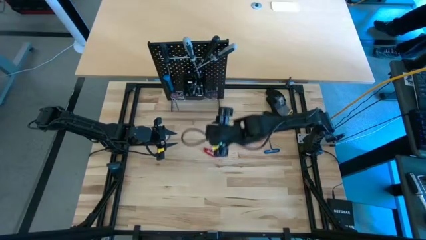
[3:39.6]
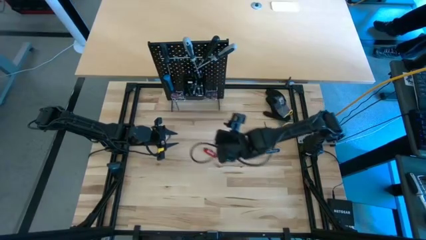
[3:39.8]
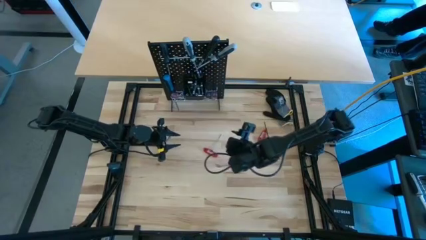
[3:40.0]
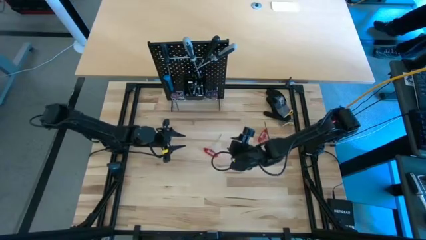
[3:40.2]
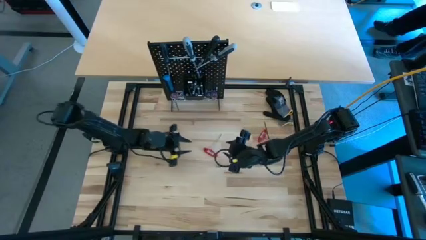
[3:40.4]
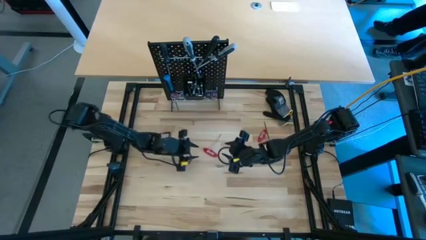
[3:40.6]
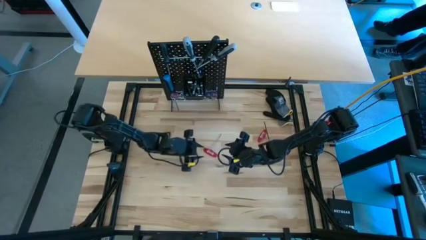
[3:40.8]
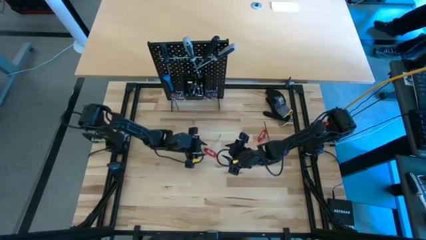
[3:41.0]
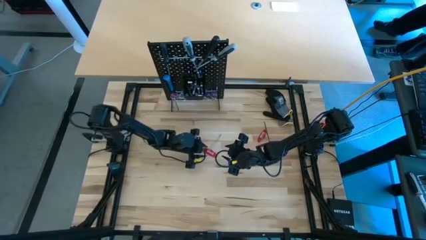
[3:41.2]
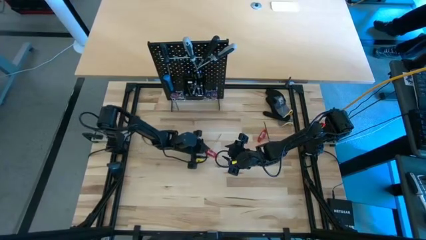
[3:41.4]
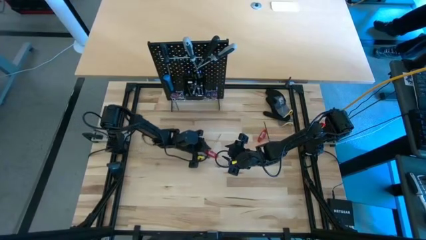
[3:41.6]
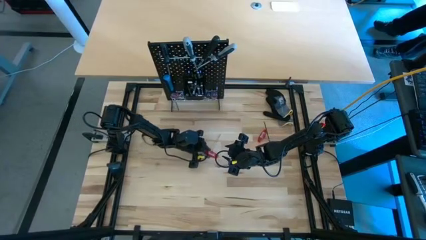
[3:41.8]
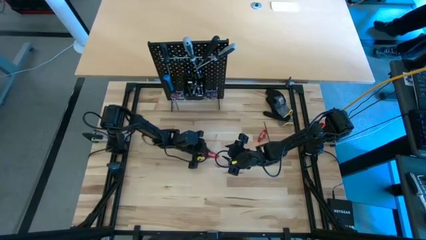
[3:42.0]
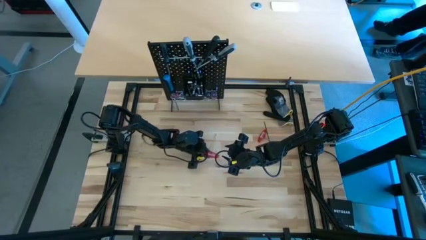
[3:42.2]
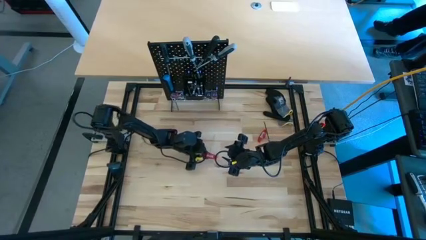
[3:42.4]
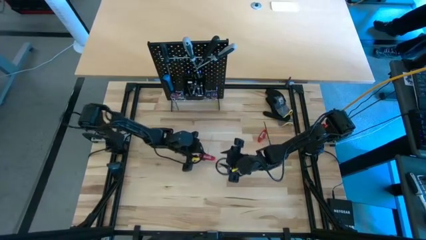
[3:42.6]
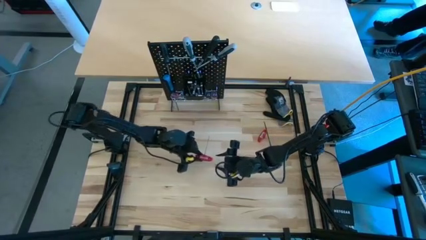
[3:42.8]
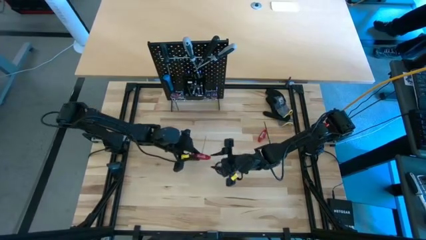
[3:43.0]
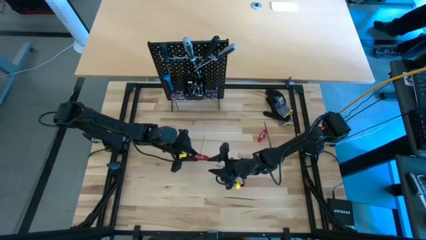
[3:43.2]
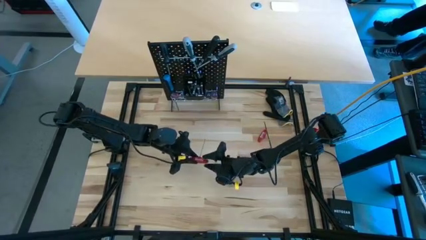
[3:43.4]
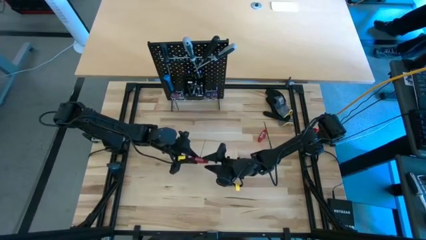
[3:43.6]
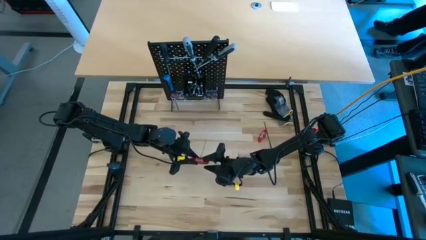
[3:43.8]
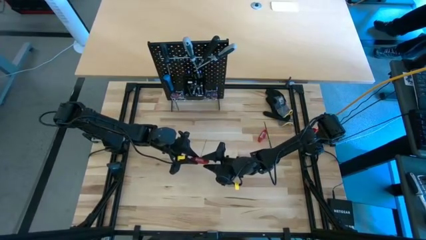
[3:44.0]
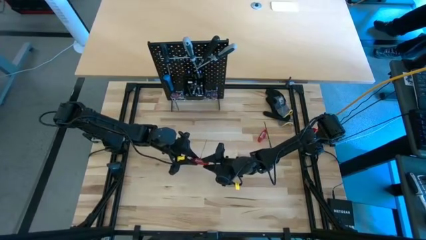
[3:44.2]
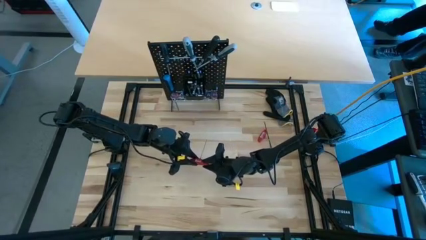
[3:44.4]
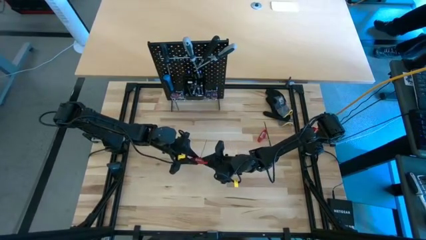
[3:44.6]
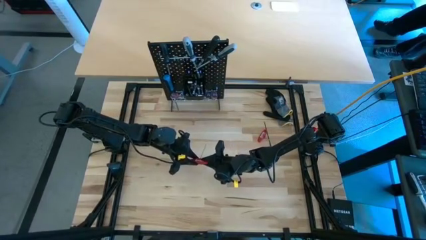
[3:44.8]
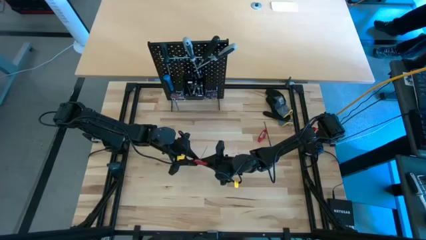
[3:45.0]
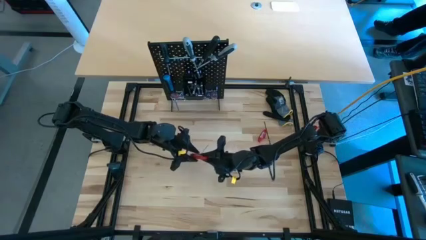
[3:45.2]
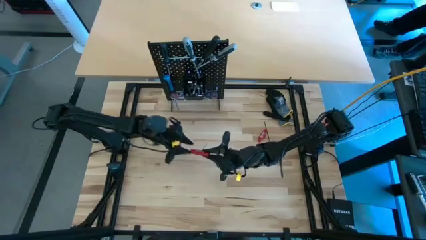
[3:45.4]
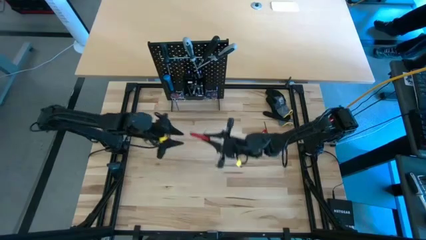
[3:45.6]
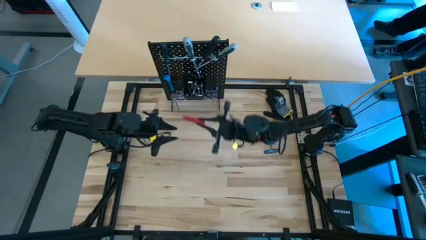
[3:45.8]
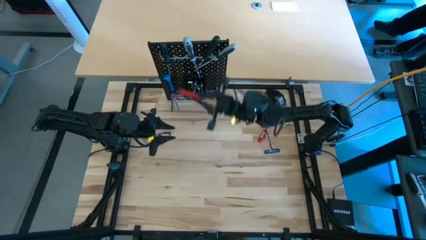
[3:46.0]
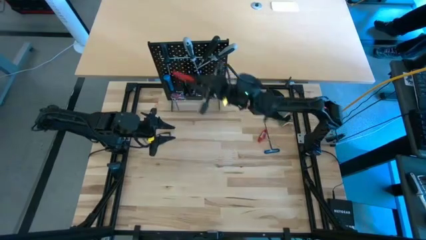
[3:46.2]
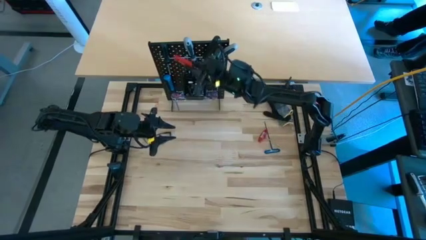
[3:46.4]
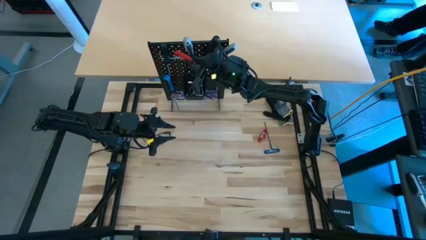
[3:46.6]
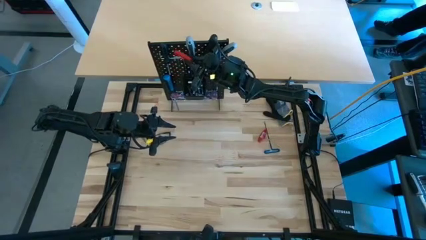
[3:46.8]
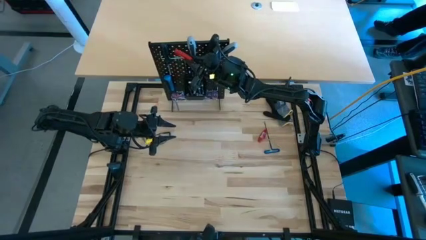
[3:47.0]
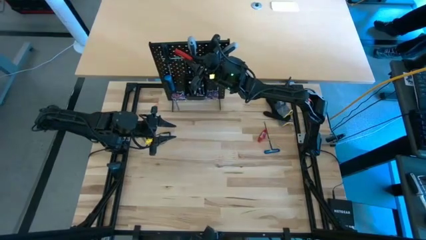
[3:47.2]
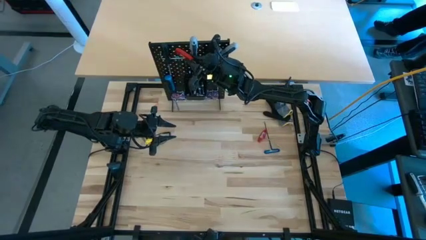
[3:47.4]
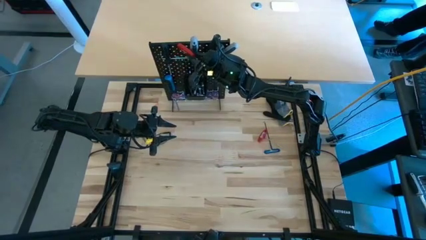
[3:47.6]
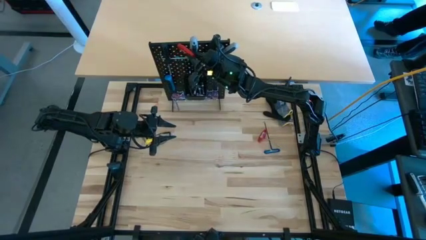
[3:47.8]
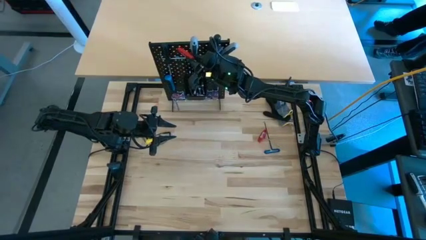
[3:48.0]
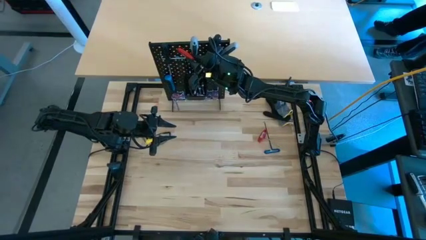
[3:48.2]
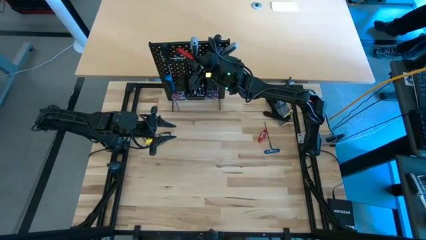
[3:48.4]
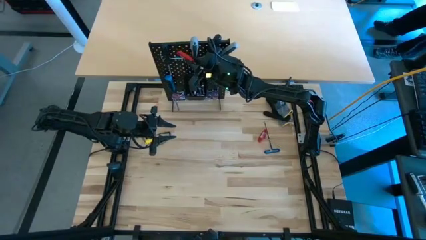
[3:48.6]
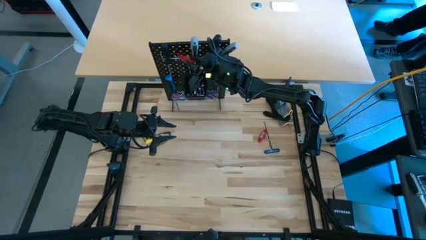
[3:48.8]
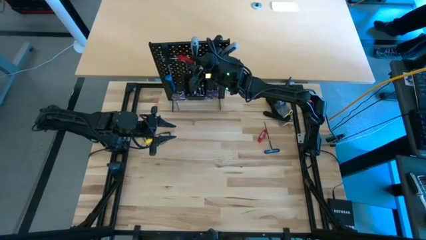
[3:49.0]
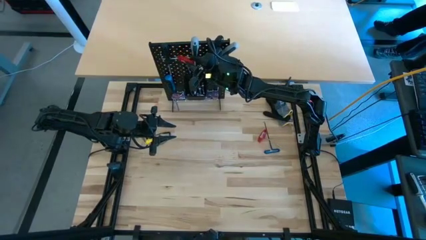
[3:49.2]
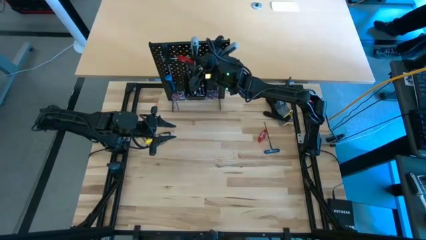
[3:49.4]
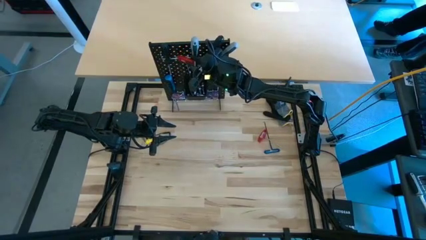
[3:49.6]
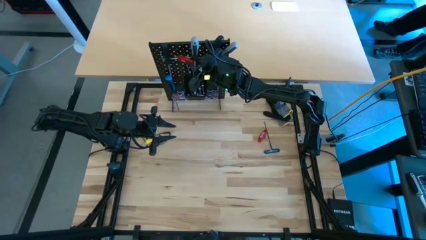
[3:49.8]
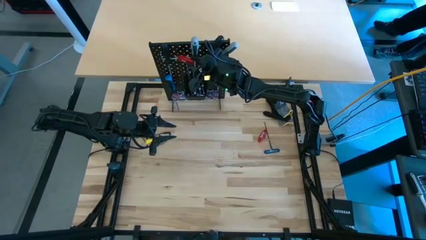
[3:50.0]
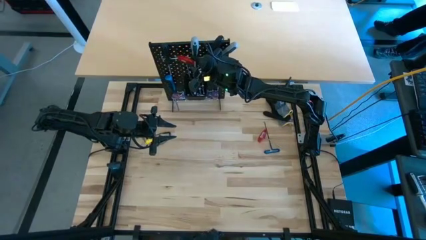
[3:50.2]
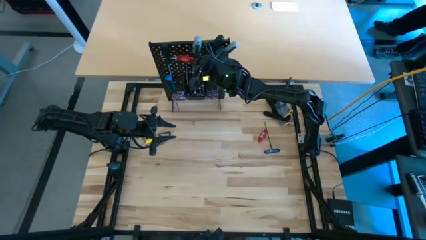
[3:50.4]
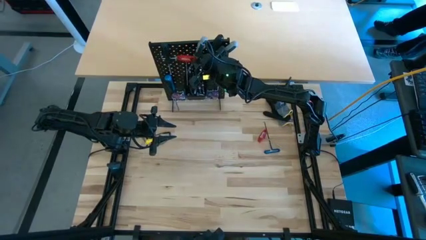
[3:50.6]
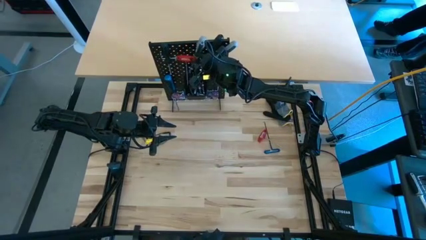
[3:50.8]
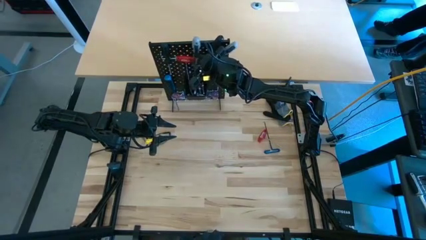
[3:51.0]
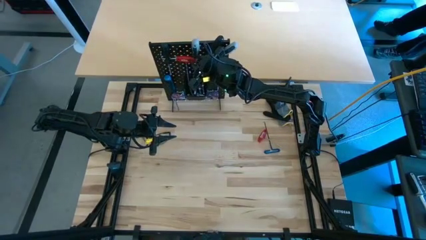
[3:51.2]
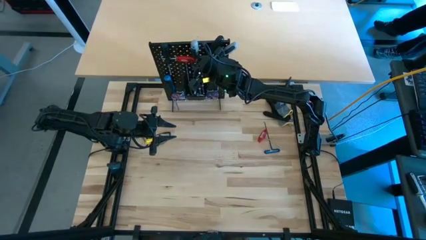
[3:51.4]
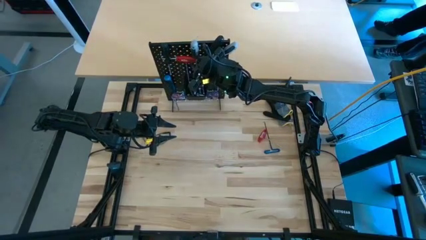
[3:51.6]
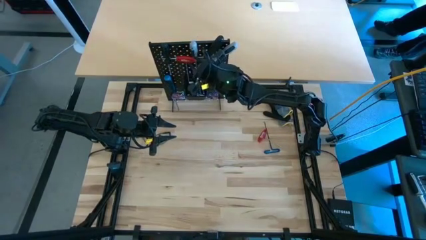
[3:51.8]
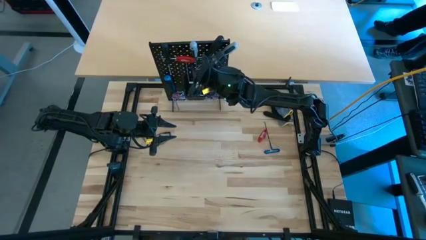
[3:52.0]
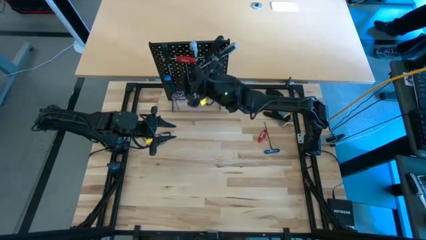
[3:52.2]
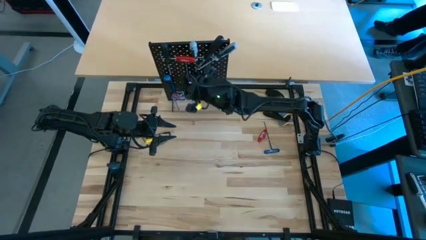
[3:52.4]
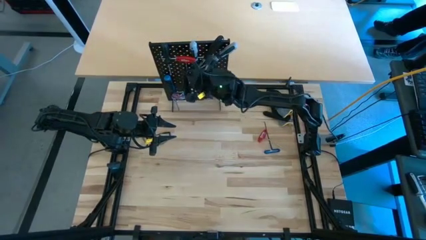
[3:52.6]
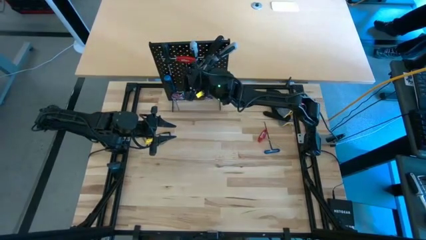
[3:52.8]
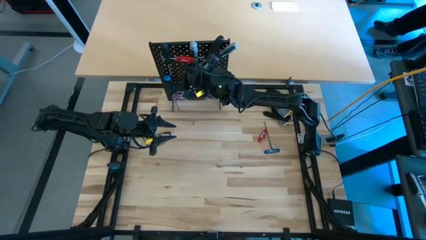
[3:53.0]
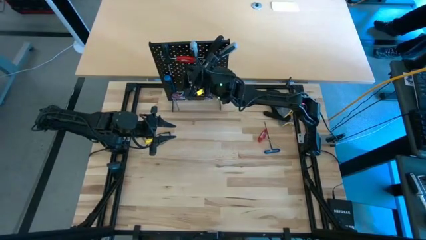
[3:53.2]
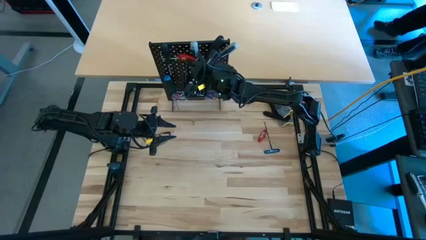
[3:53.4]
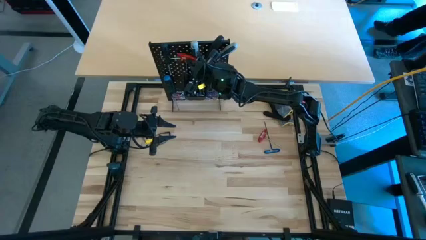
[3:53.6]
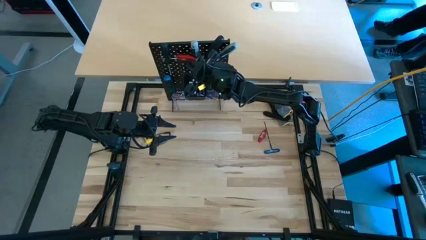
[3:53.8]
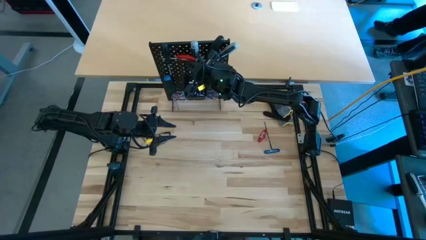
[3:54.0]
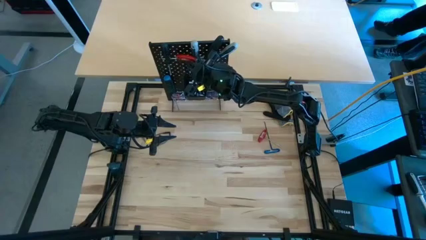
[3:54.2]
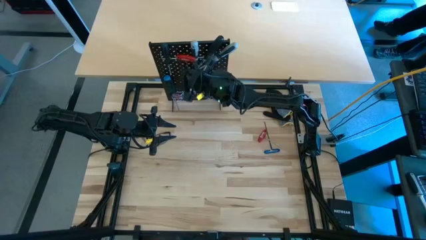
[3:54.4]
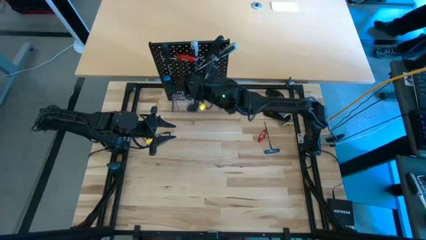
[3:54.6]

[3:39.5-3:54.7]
Task: Hang tools onto peg board
Hang the bottom red t-handle hex key on the peg board

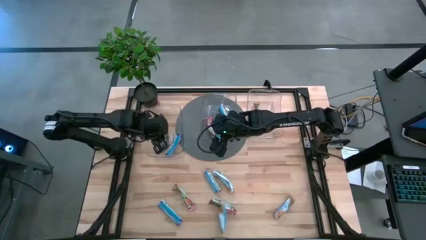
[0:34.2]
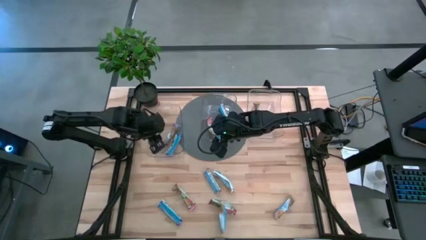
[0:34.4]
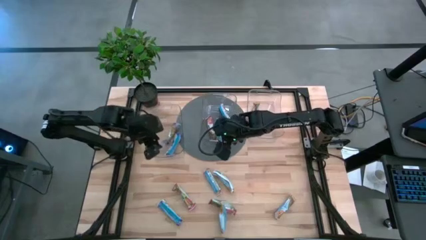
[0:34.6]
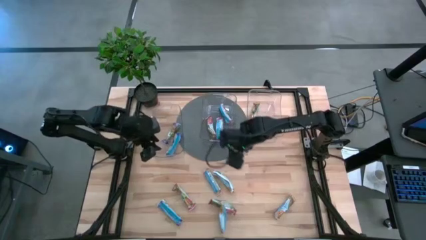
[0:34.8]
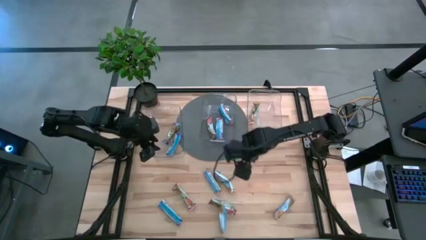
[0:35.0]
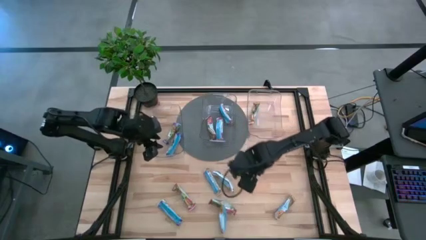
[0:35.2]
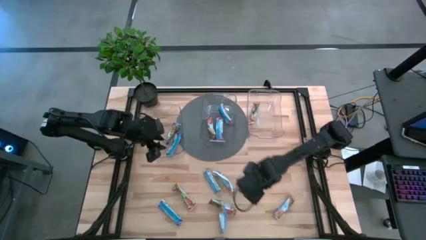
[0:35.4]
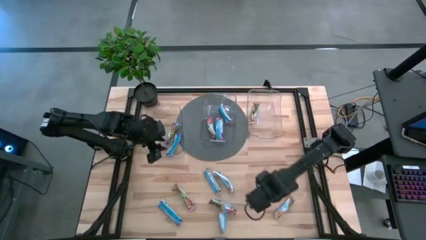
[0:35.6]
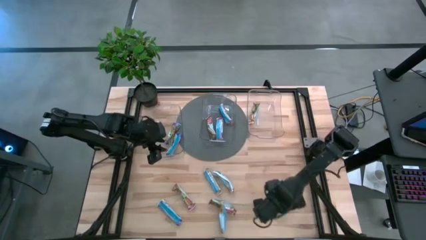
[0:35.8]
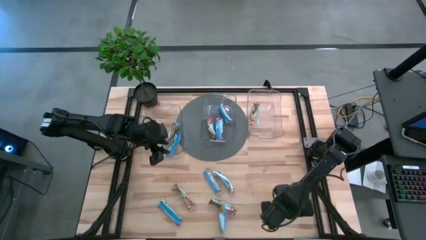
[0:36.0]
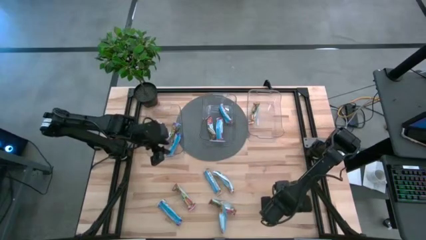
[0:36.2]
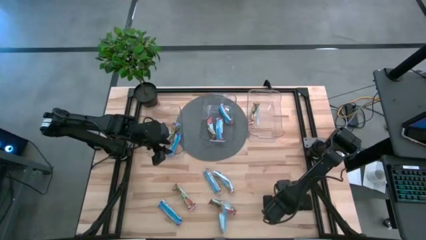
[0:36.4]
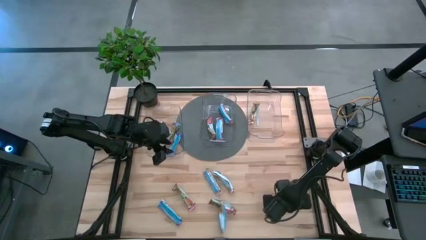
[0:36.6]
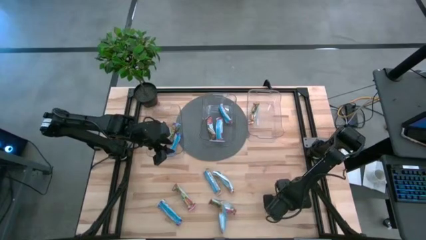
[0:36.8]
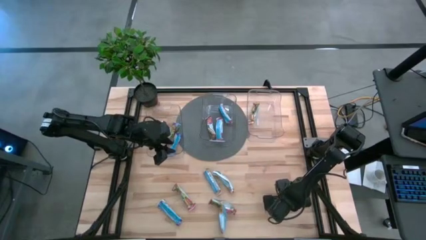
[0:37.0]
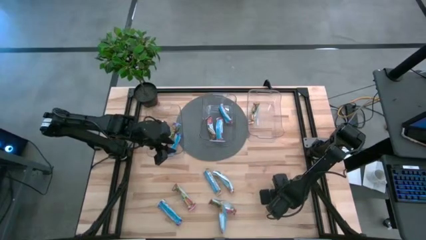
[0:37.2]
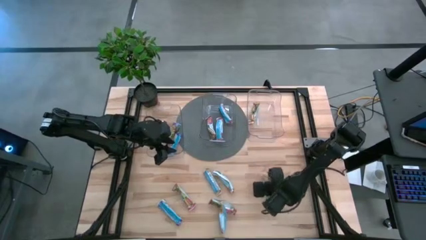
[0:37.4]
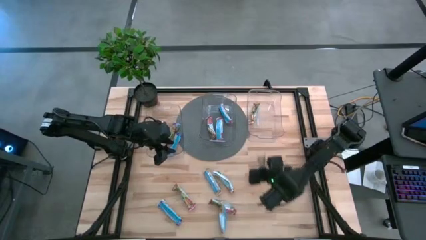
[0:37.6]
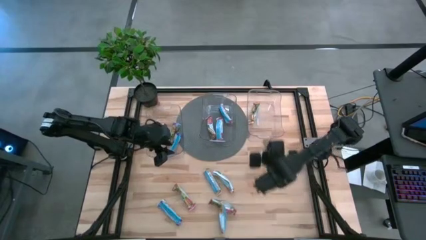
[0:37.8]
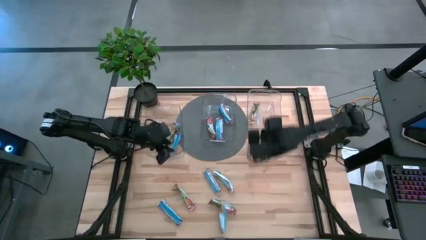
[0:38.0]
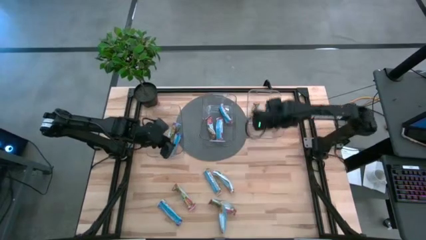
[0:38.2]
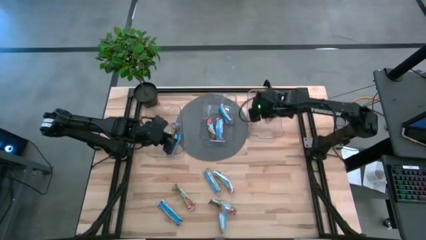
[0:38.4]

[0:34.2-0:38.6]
Task: Pick and place Granola Bars by type
Put the orange granola bar into the right transparent bin
